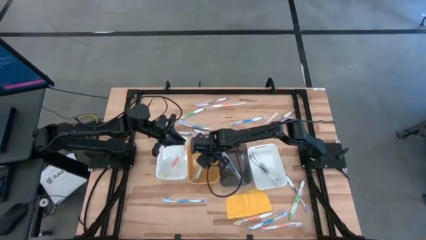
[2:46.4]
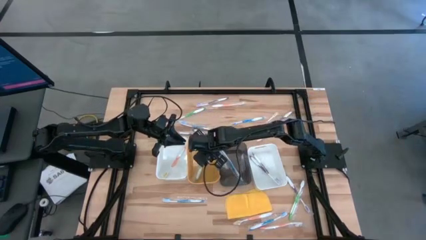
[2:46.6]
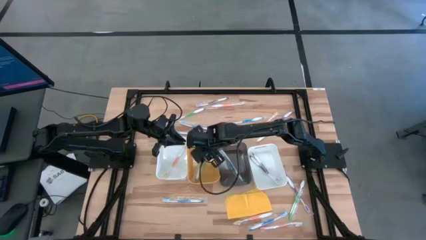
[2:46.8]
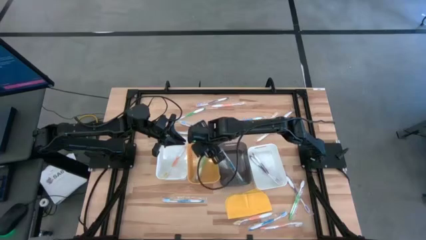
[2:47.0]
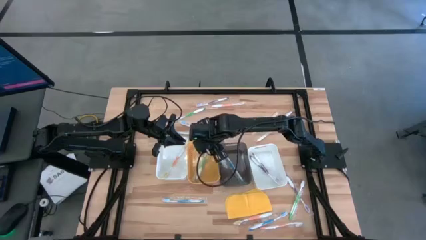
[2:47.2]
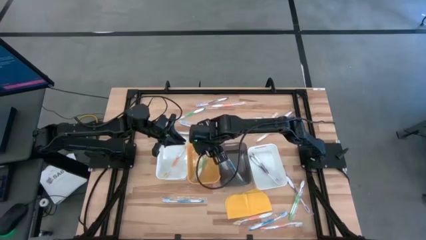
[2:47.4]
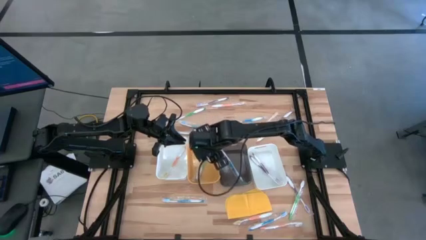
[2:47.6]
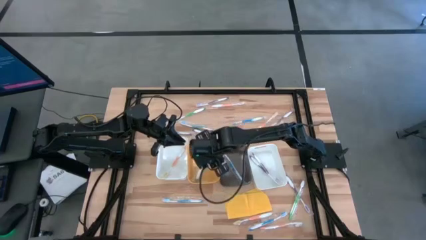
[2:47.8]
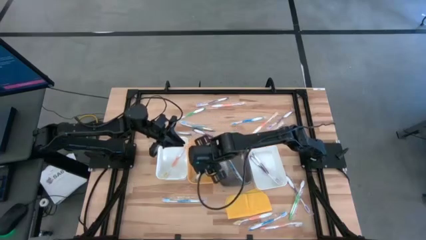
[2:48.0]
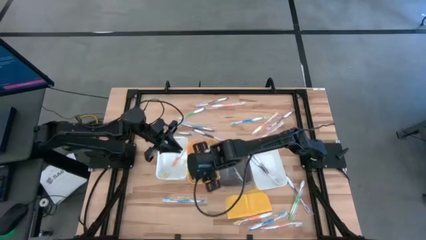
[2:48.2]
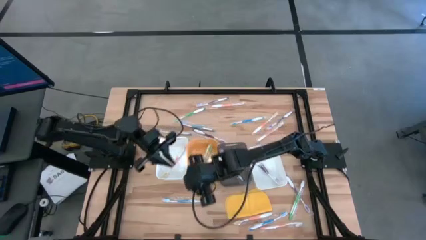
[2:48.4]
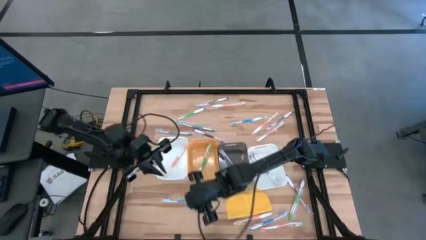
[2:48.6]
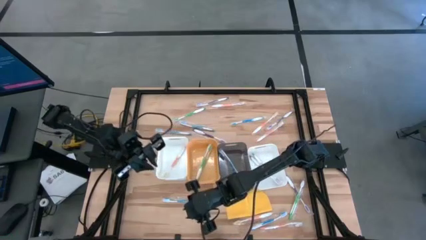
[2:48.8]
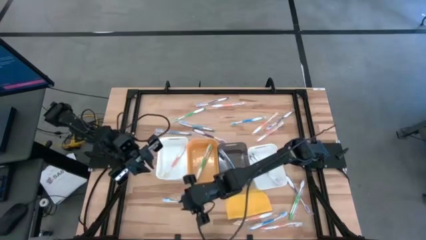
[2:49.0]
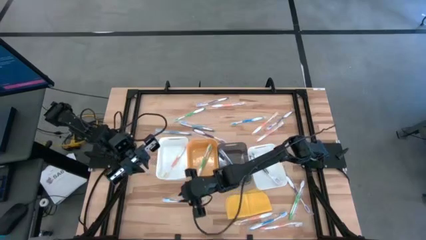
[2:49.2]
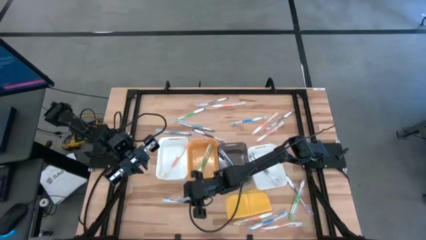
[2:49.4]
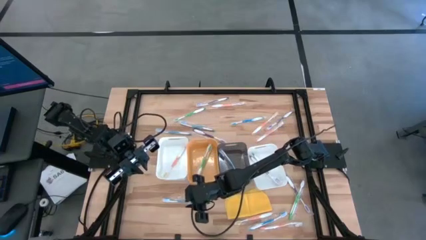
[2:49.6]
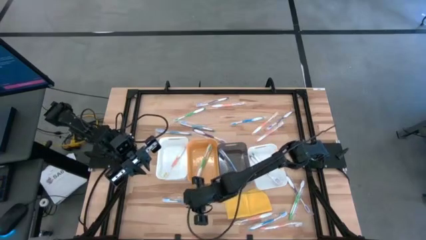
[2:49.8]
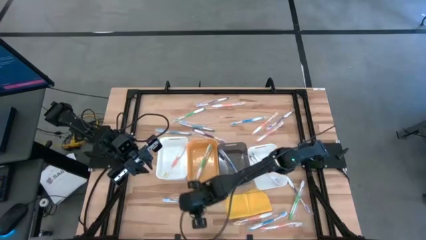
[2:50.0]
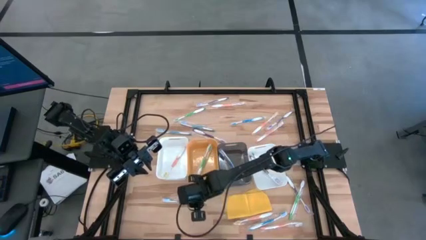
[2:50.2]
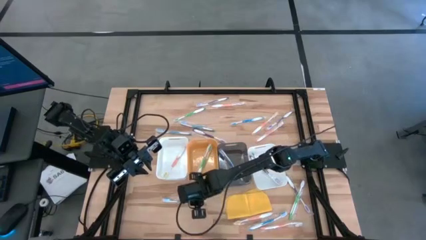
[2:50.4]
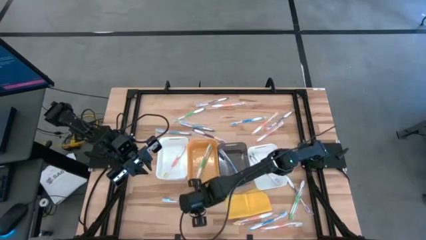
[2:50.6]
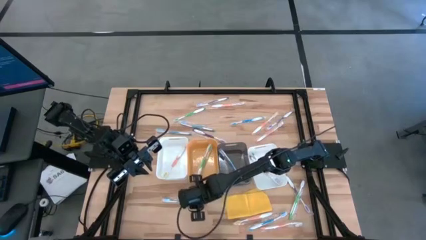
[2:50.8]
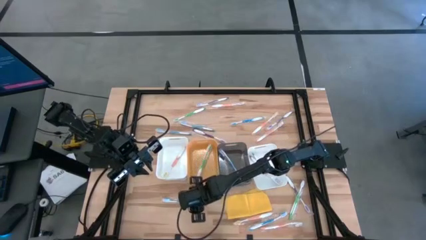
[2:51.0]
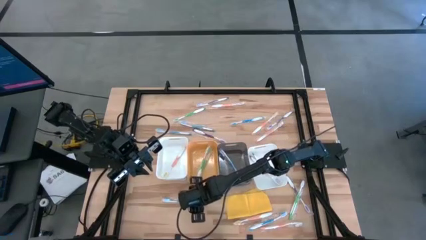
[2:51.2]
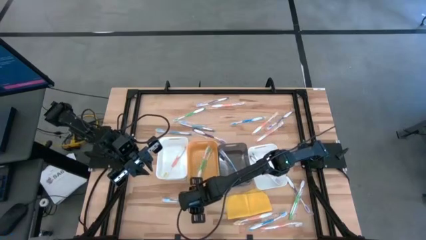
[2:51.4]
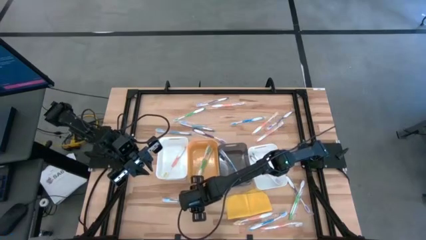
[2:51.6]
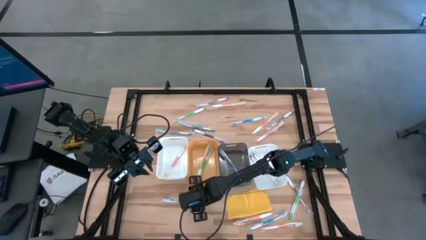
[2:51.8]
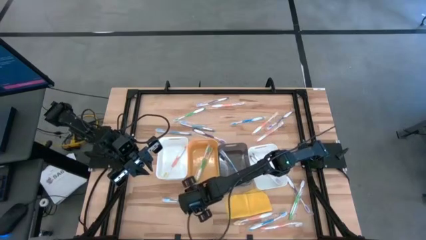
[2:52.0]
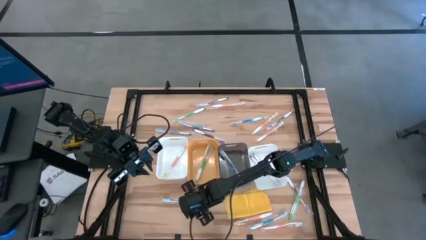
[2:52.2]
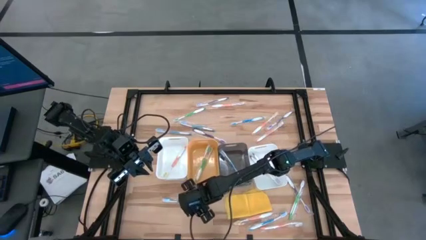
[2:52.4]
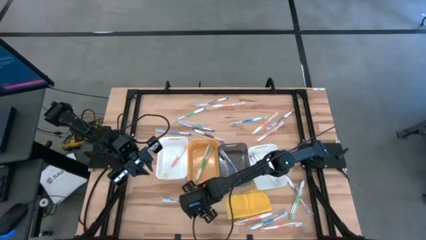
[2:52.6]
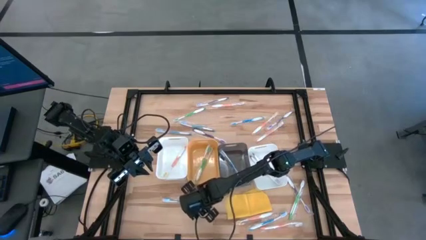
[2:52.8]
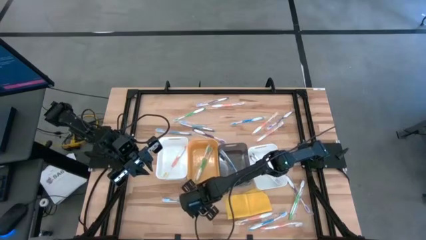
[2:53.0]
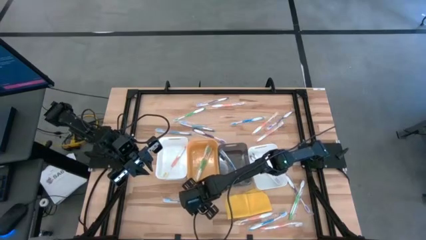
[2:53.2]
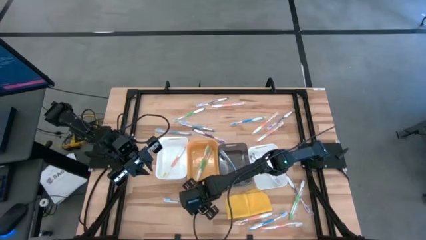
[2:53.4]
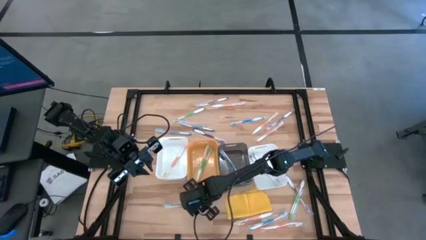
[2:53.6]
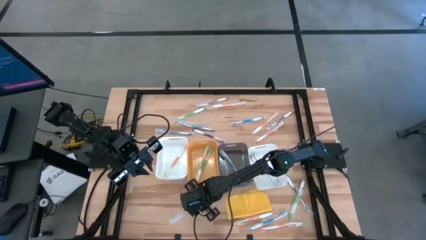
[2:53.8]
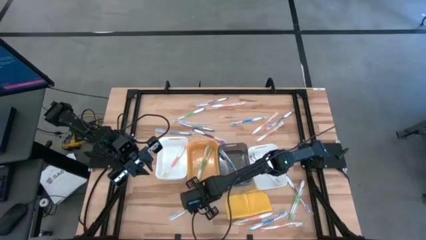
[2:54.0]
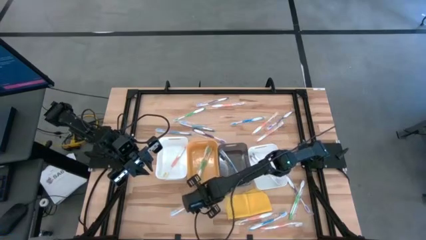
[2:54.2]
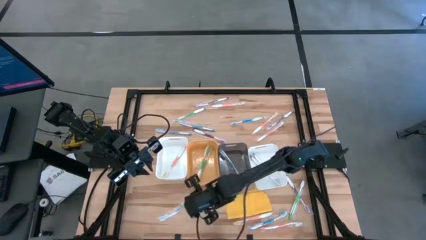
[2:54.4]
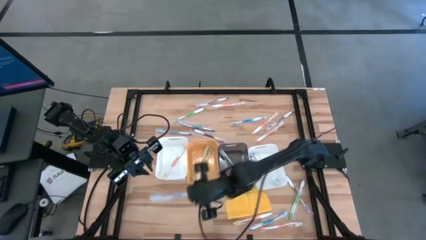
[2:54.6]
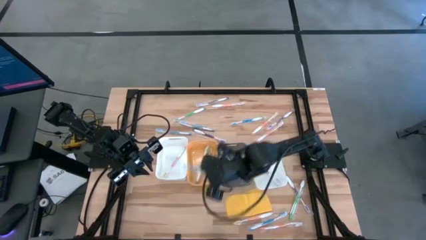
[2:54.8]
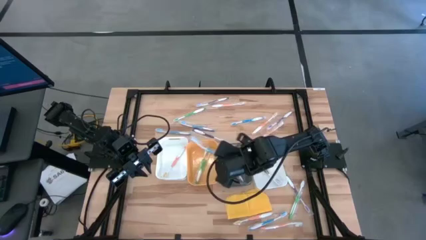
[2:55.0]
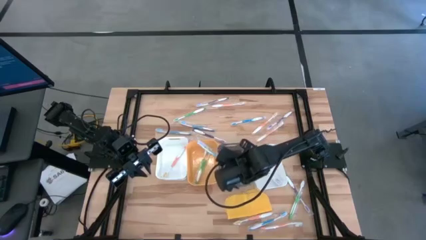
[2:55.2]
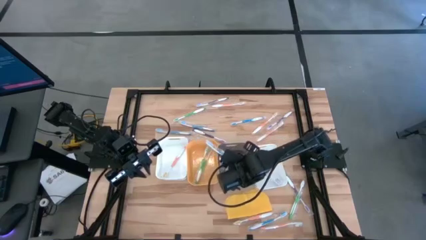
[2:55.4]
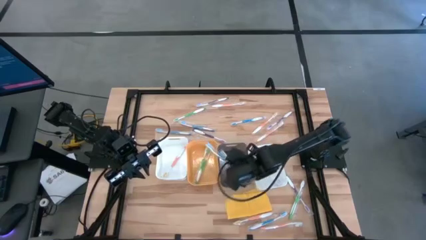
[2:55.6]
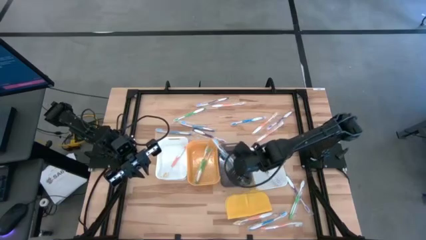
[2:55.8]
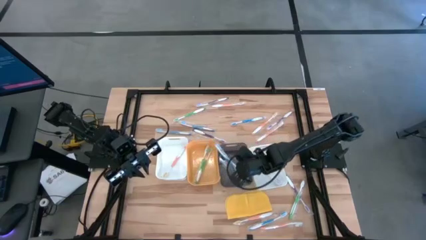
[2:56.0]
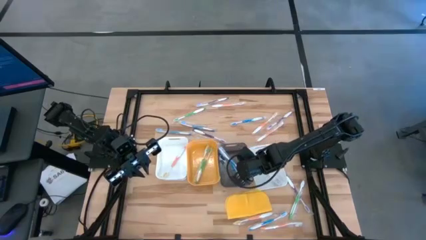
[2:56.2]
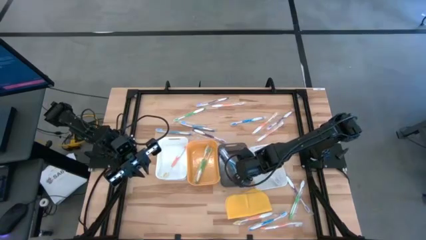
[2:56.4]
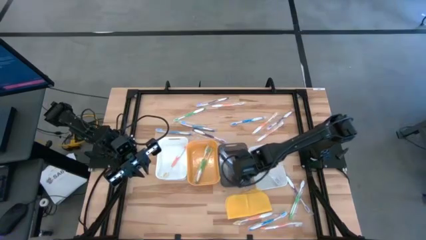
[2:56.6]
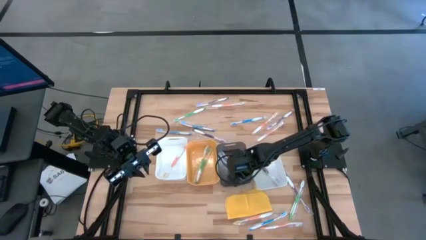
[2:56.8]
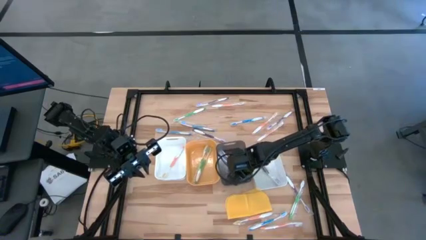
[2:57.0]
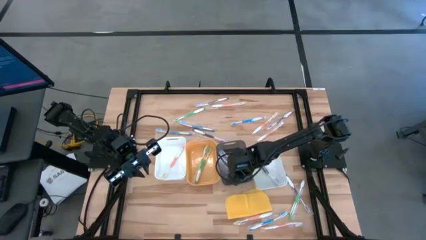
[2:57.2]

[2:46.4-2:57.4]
Task: Pick & Place Toothbrushes
Put the blue toothbrush into the black bin

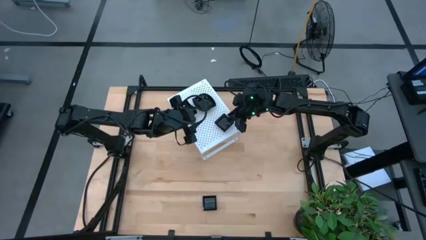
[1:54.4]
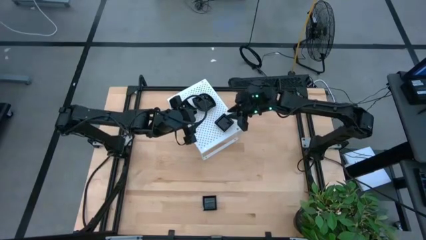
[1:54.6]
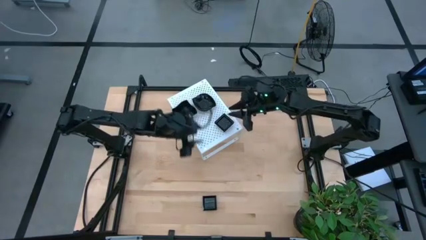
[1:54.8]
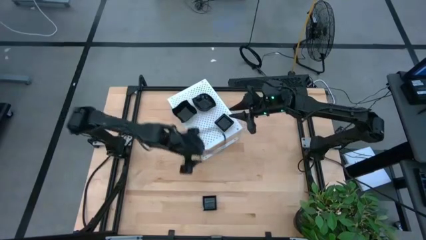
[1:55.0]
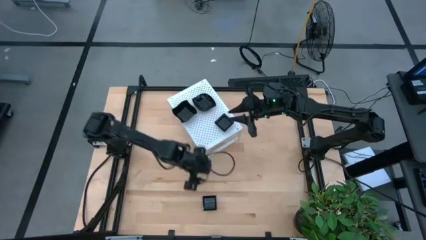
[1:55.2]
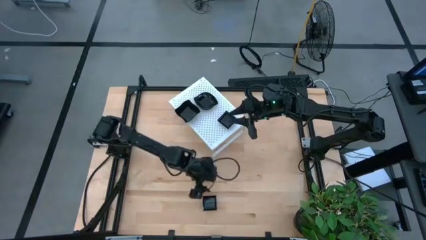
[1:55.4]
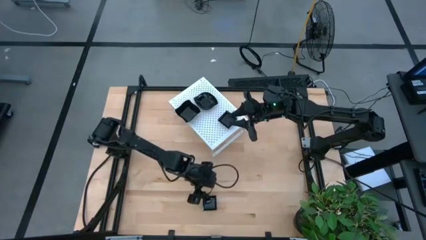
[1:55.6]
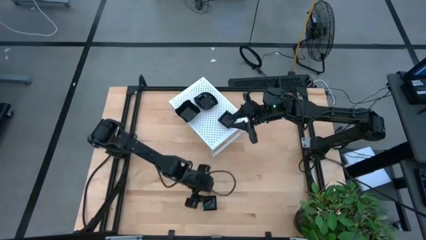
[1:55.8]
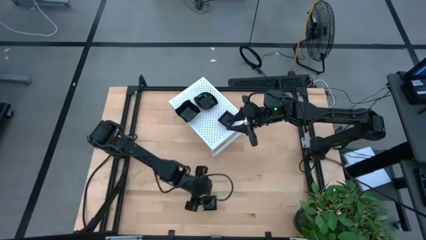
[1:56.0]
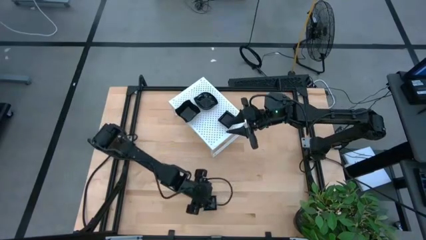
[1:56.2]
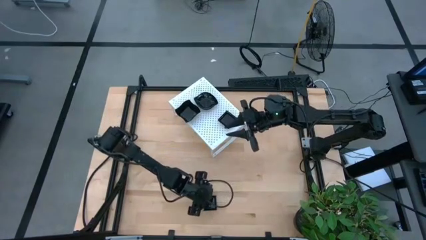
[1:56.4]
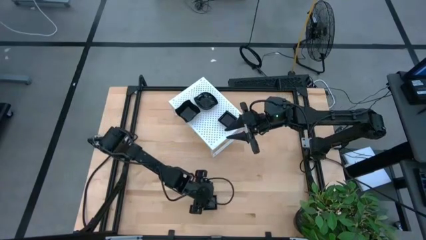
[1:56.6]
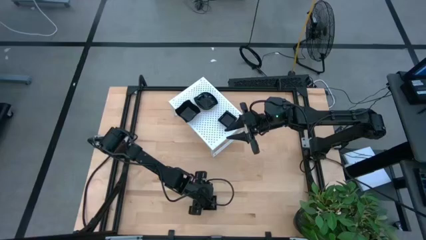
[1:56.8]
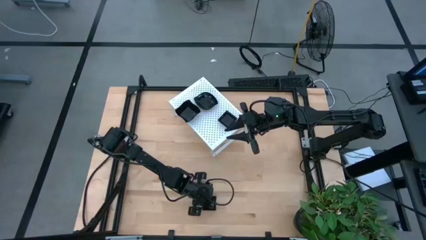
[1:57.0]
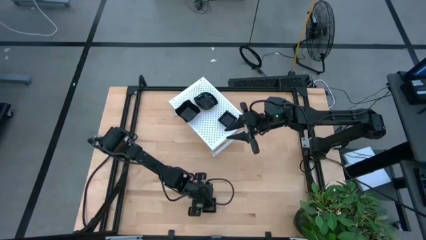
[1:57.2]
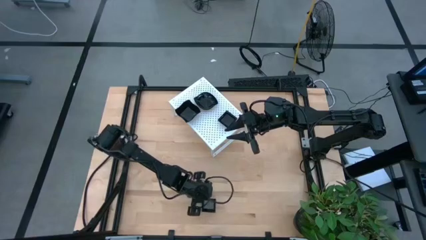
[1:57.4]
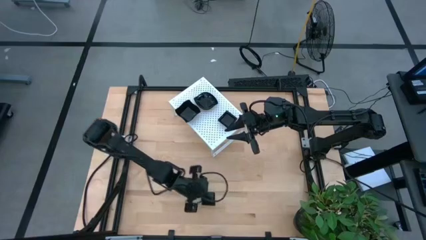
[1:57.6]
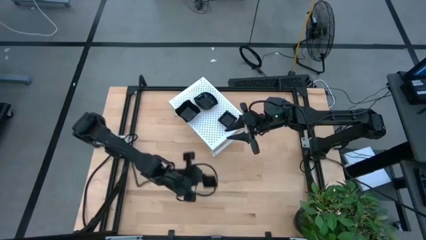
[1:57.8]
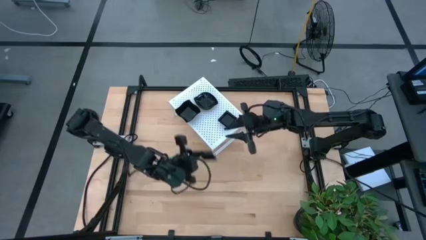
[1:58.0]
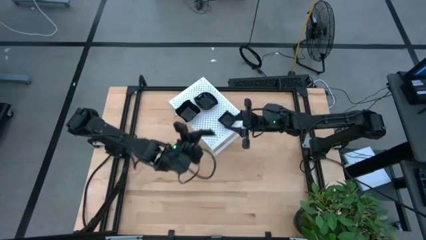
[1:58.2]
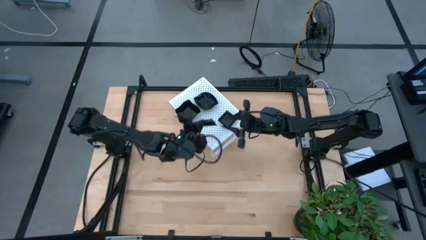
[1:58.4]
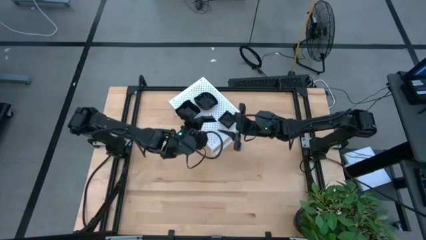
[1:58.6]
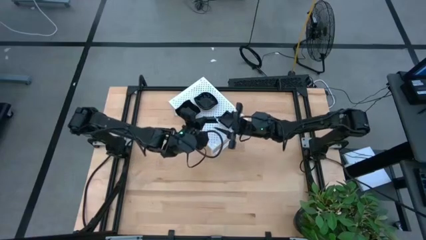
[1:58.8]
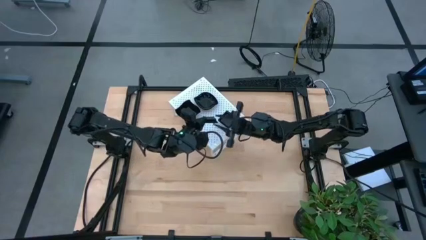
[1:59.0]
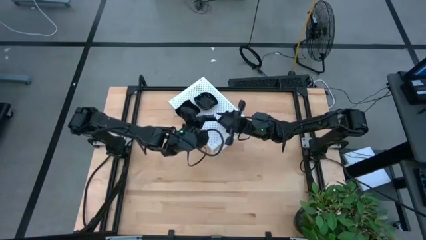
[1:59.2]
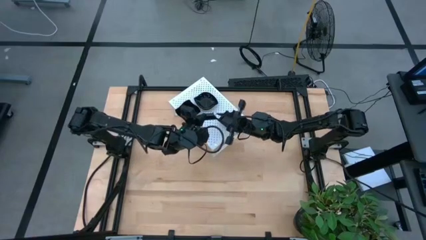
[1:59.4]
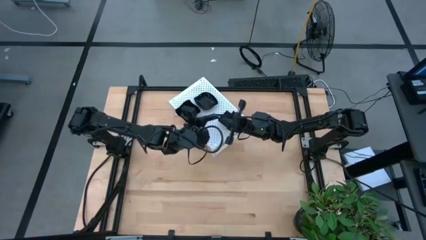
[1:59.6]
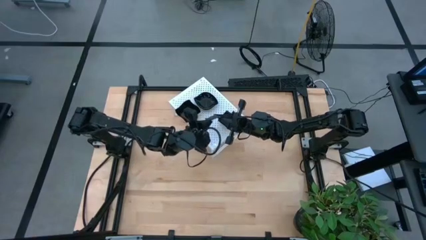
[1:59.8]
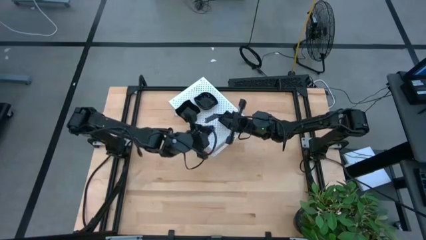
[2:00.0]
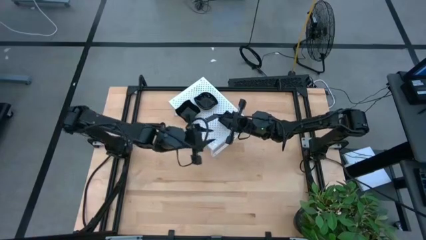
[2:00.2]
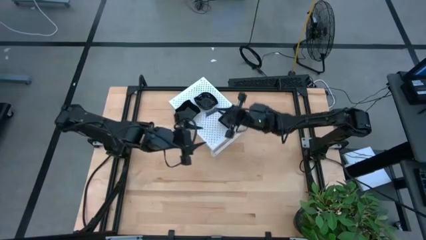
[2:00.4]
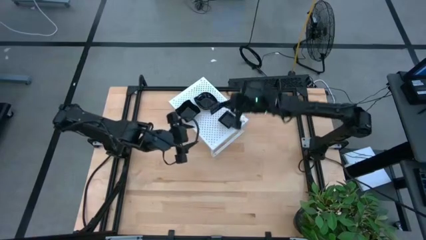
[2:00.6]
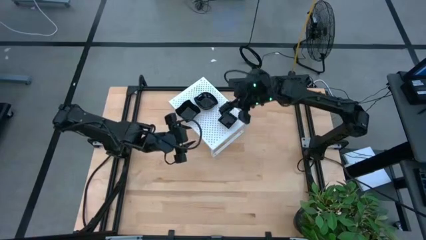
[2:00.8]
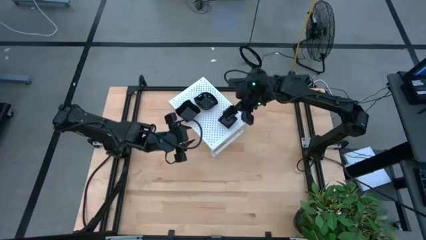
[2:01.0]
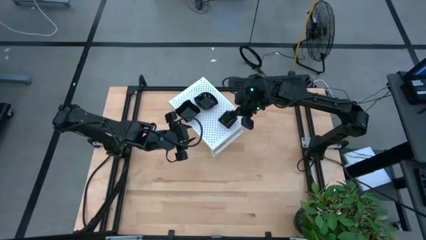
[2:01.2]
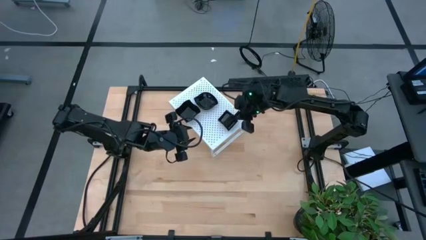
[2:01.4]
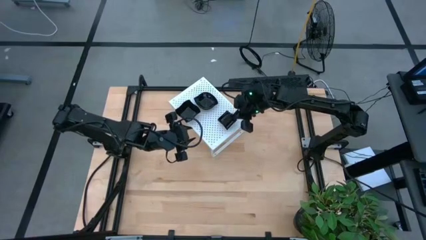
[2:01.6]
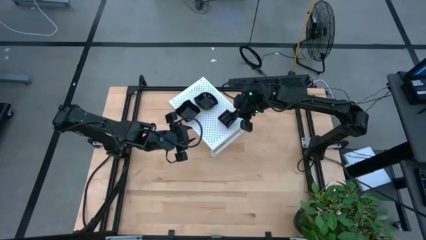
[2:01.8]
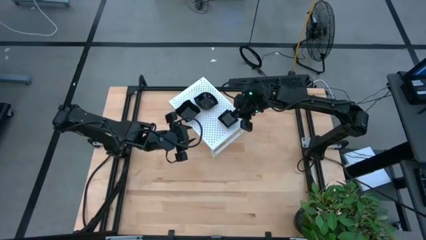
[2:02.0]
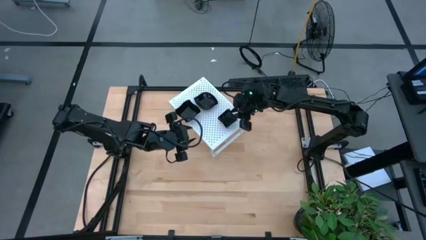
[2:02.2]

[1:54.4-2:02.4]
Task: Pick & Place Mini shaped plates
Stack the square plate on top of the stacked square plates on the shelf
